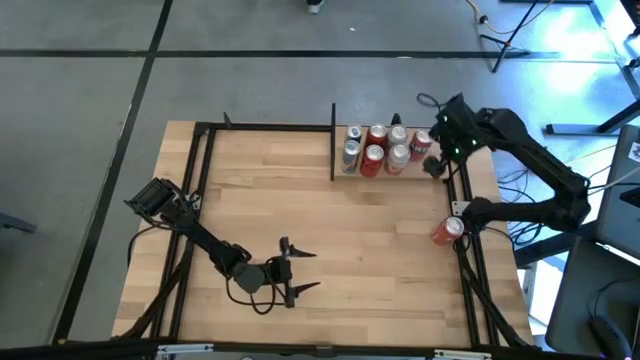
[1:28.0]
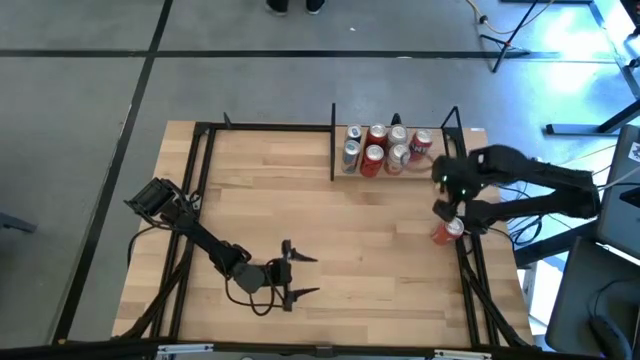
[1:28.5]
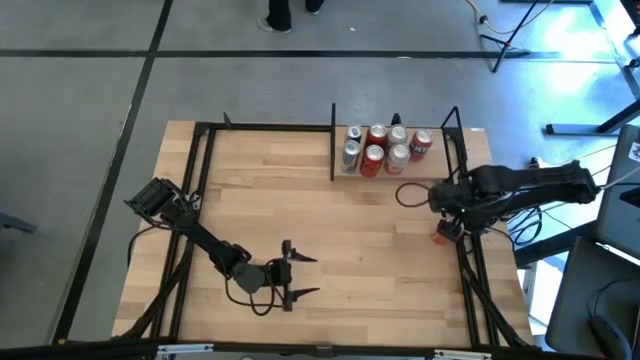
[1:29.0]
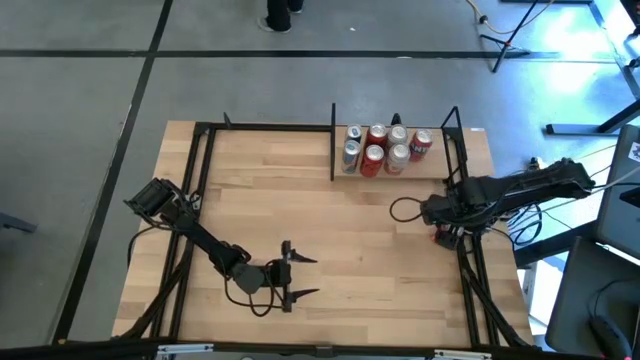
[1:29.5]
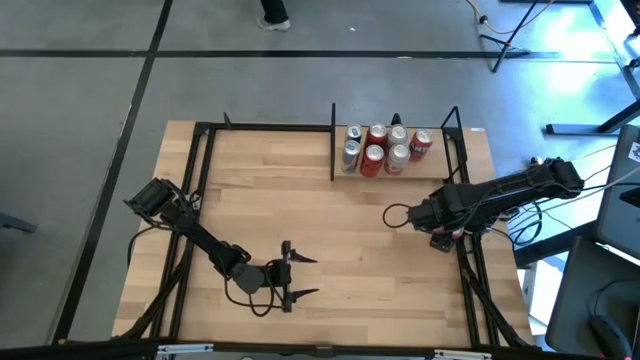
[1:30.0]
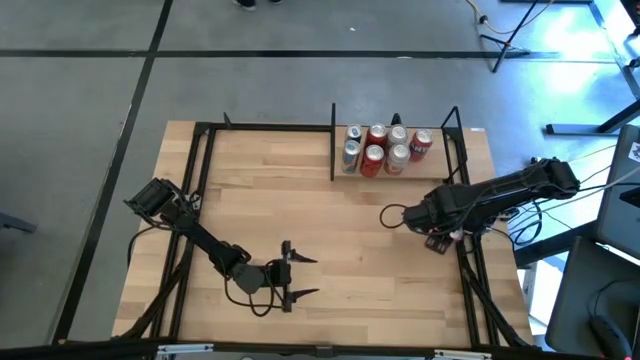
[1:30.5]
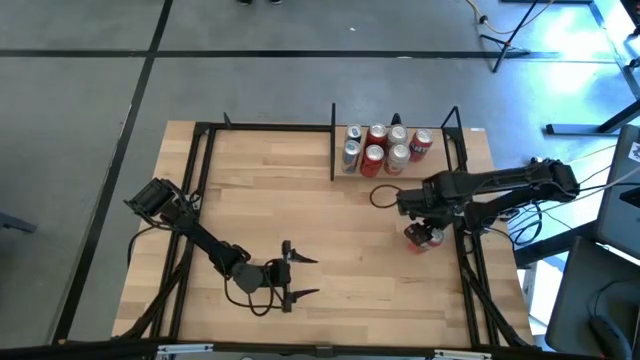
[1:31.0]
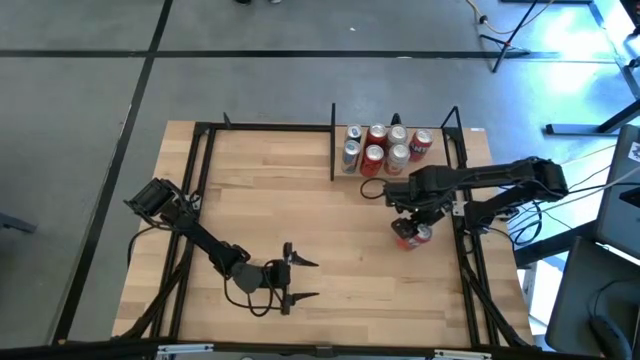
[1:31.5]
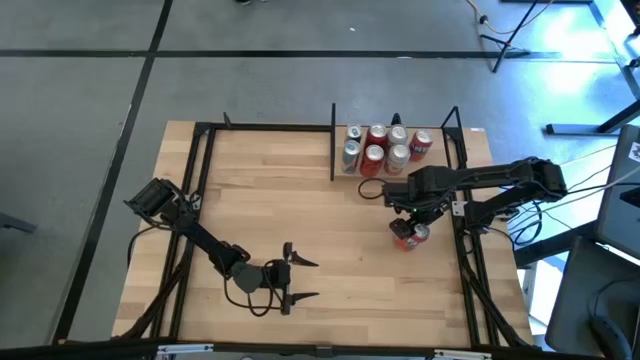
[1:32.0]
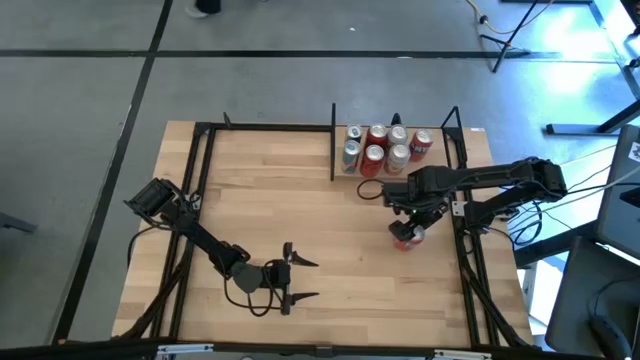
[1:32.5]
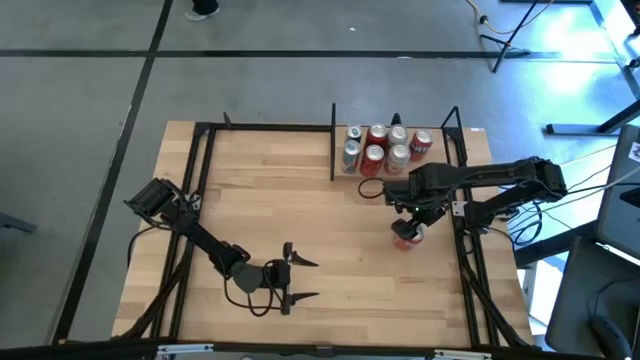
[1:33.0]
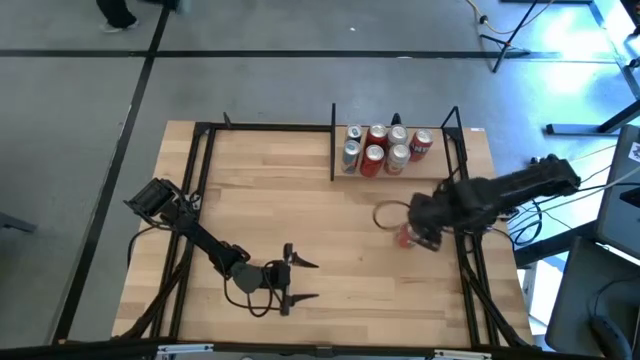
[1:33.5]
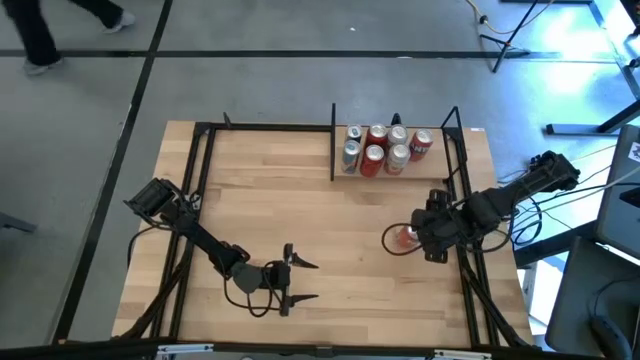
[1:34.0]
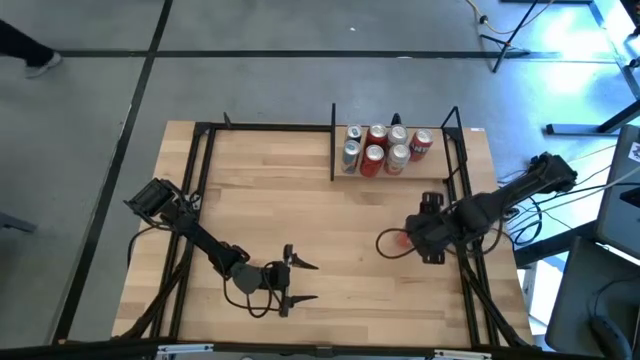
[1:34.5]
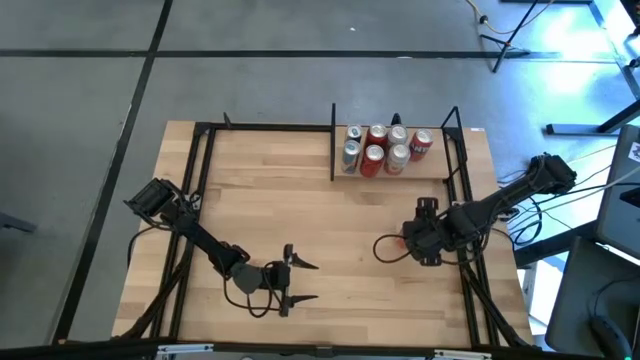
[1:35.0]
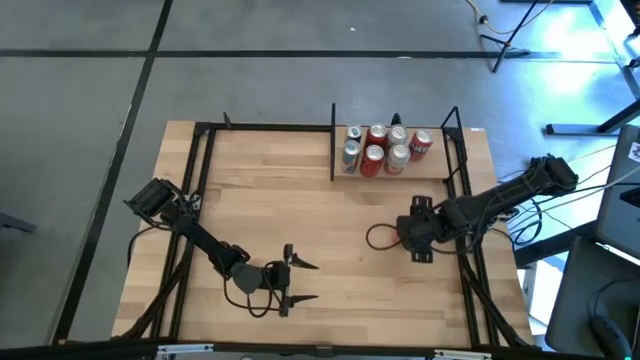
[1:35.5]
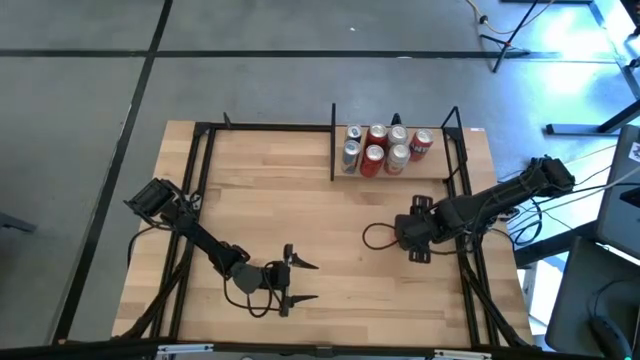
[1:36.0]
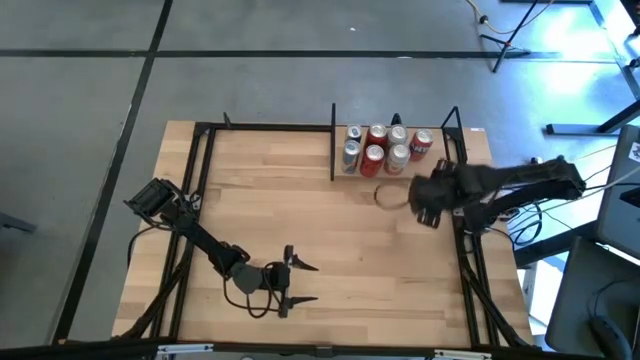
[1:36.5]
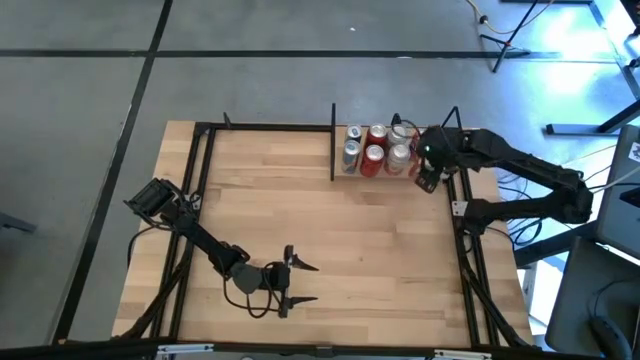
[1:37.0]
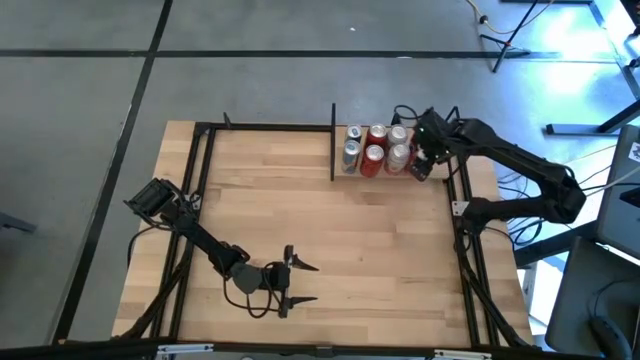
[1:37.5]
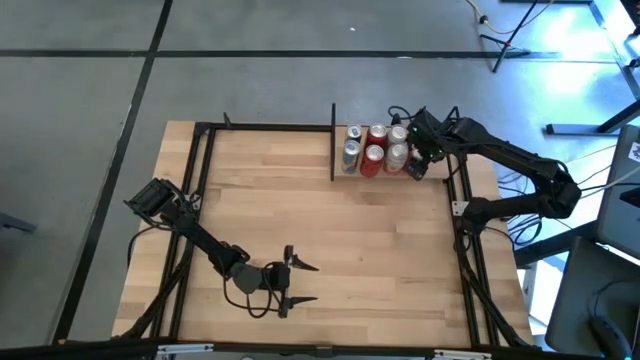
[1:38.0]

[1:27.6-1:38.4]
Task: Place canned beverage on shelf
Put the red soda can on the shelf aligned with the other red soda can

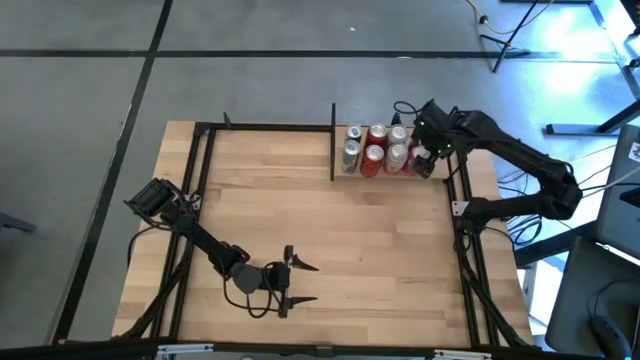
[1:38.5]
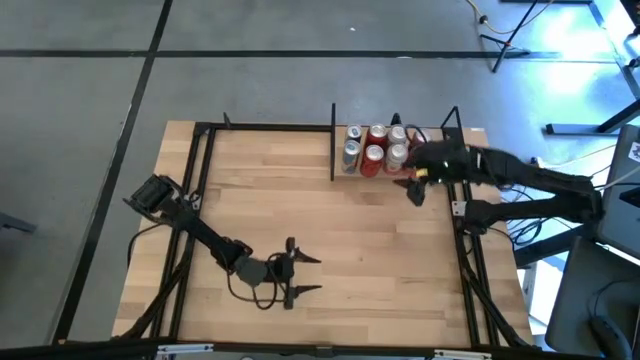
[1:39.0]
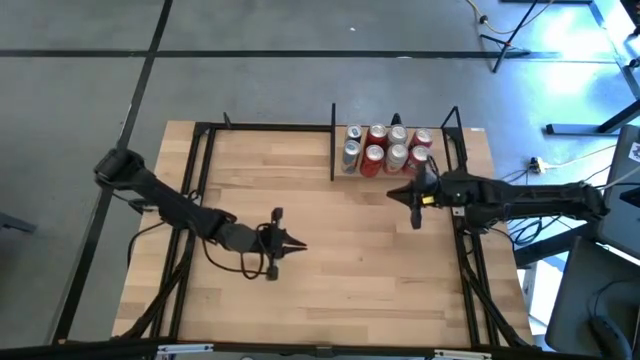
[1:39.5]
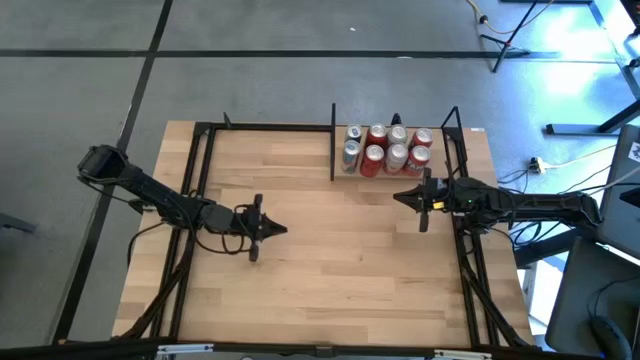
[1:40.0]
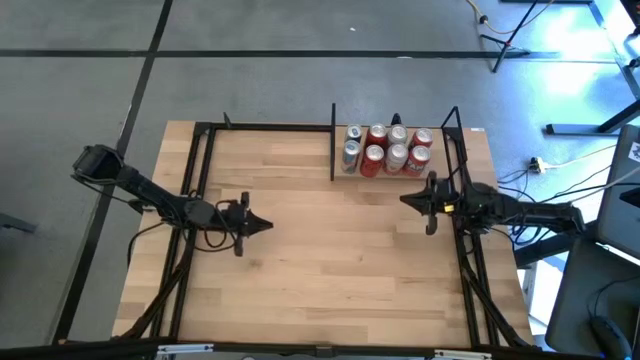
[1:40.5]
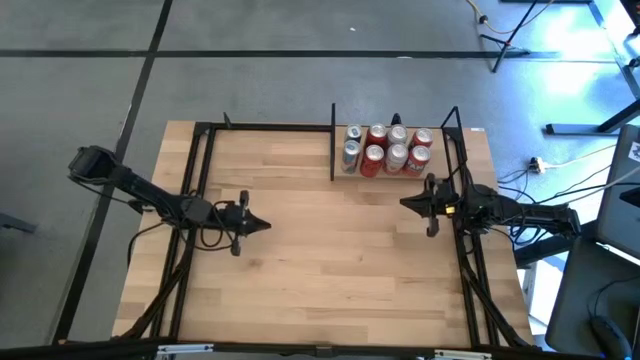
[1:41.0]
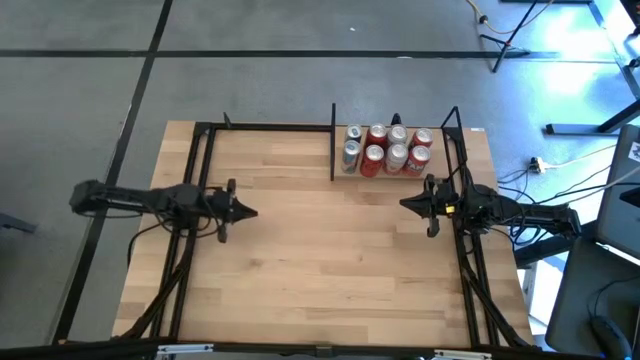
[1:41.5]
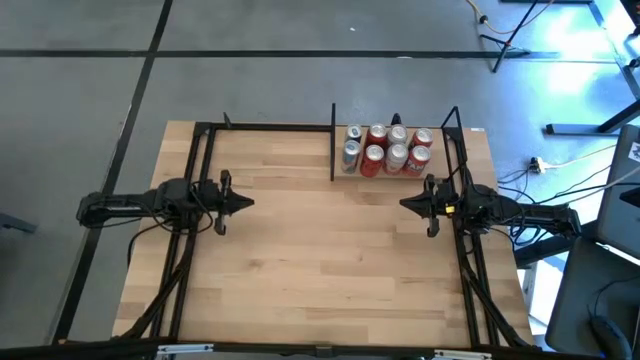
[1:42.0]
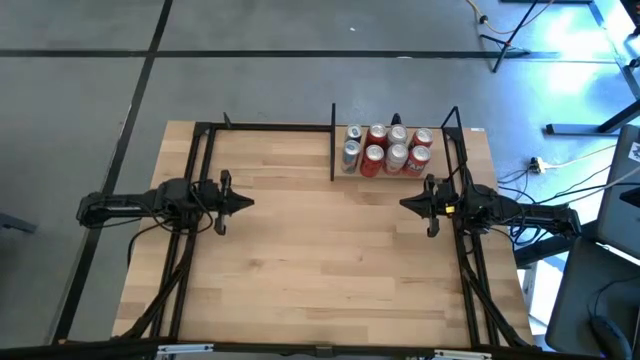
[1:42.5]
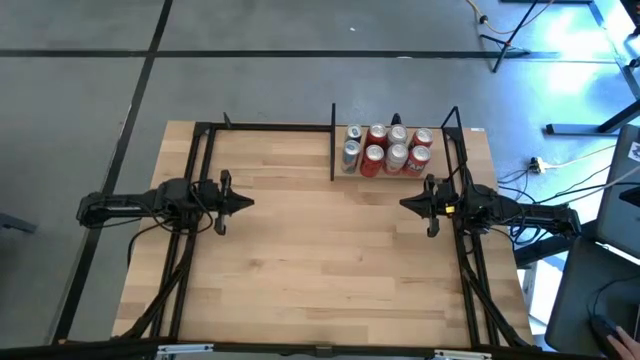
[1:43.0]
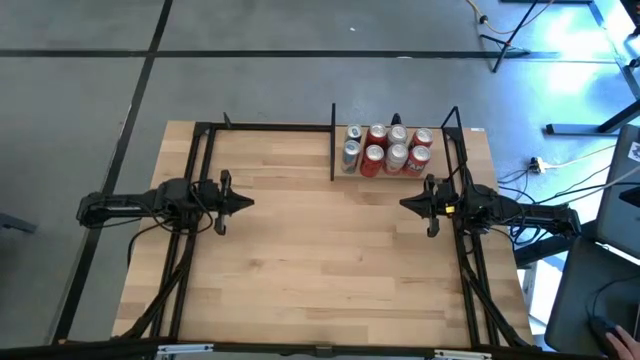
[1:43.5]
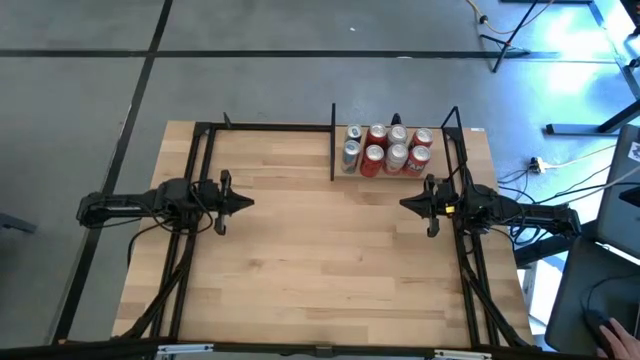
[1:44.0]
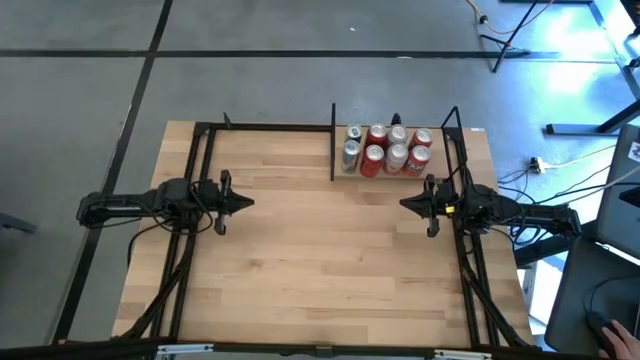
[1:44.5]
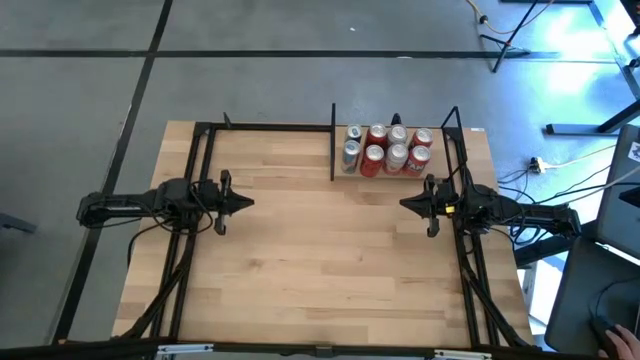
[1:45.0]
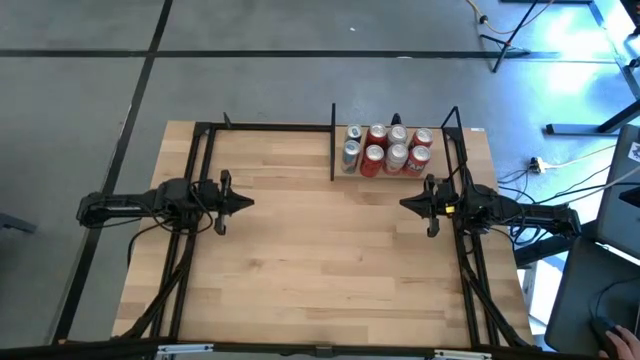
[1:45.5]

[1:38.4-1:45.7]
Return to Home Position

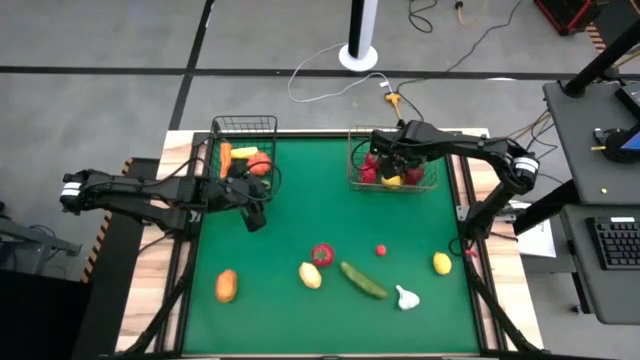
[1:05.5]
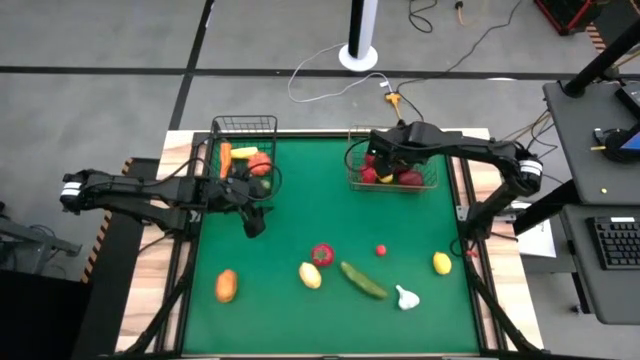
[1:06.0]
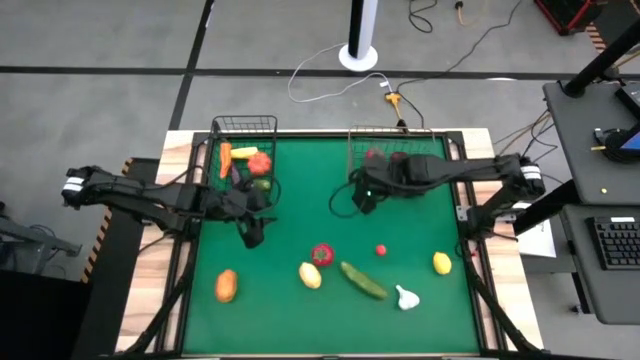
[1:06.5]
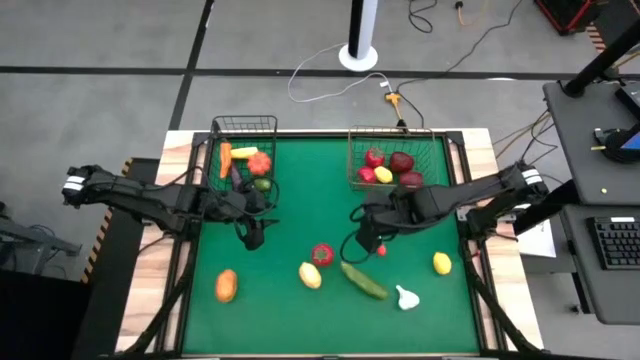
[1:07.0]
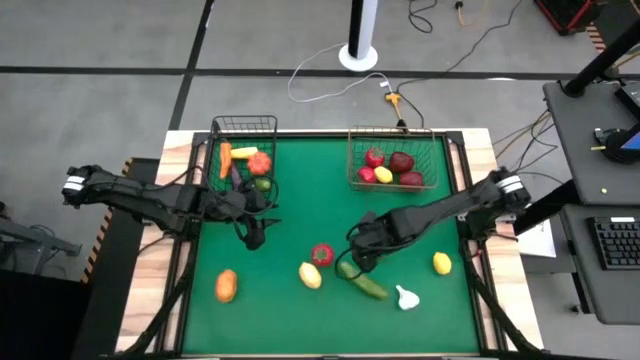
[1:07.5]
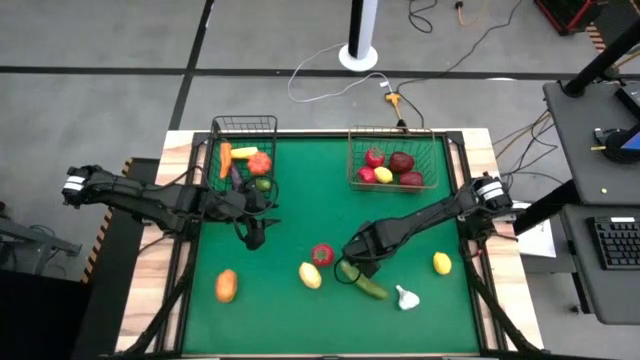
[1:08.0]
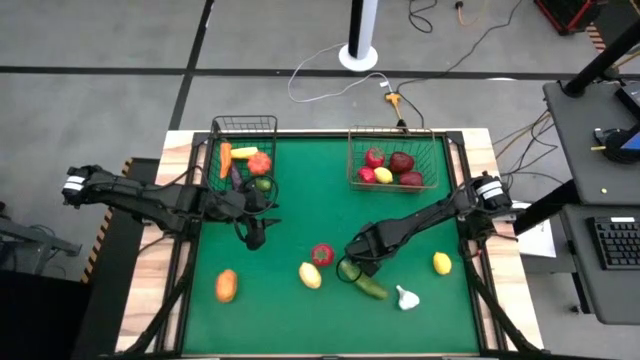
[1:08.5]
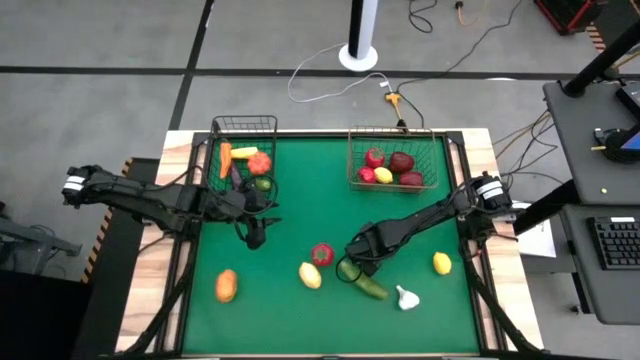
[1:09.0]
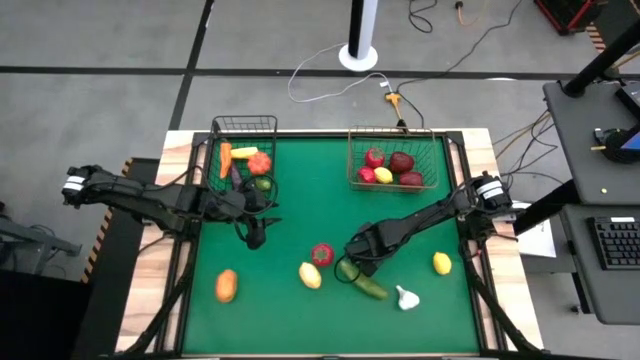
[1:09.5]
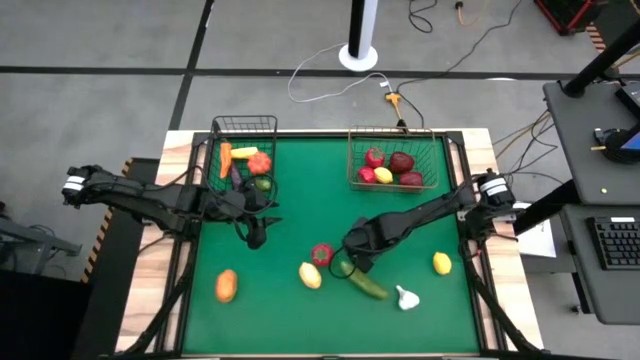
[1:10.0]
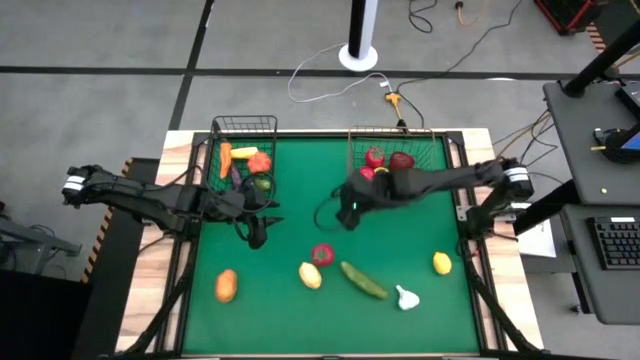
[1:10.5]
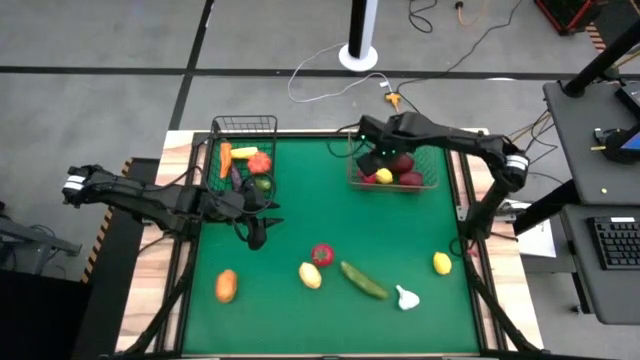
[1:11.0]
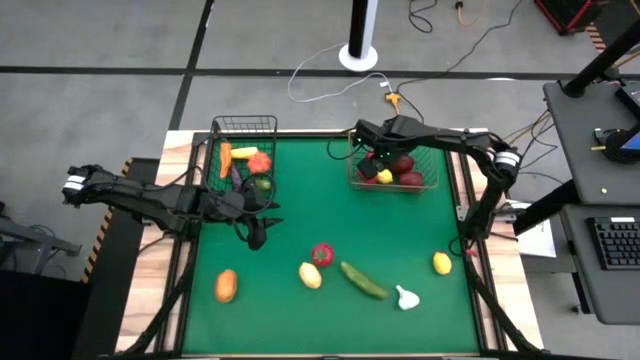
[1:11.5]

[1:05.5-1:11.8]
Task: Sort produce into baskets
Put the right red tomato into the right wire basket
